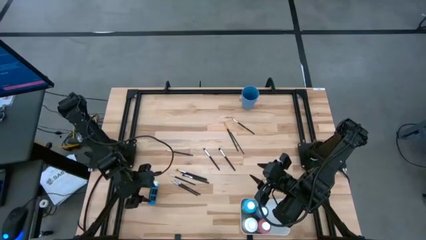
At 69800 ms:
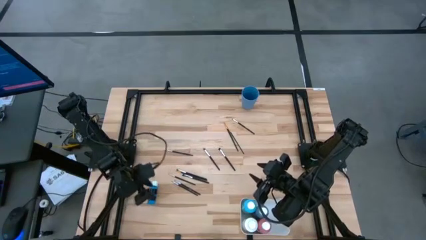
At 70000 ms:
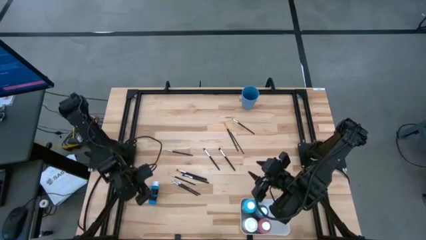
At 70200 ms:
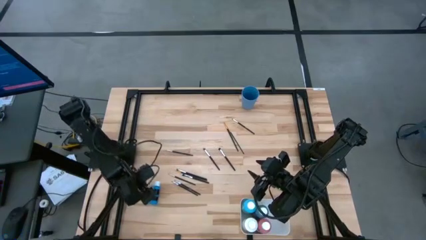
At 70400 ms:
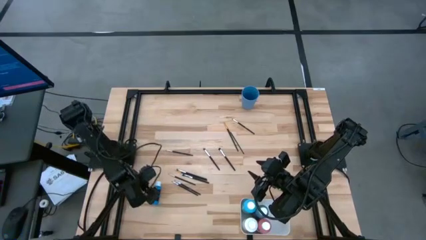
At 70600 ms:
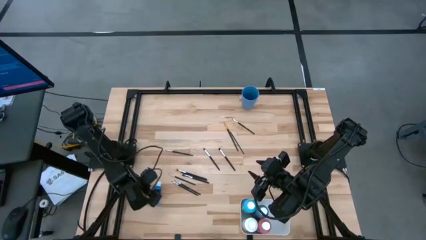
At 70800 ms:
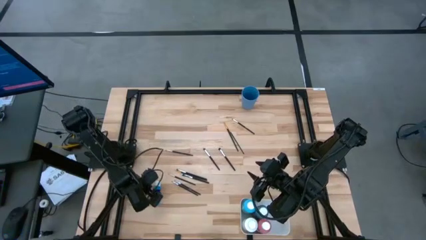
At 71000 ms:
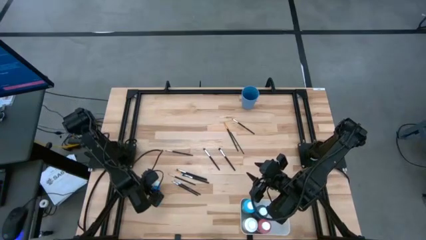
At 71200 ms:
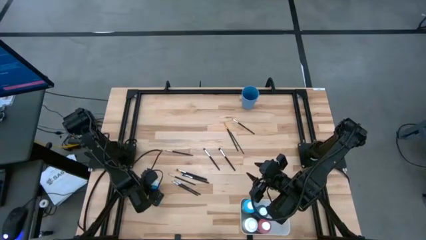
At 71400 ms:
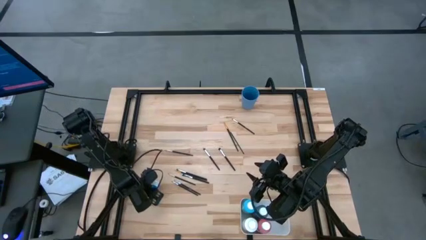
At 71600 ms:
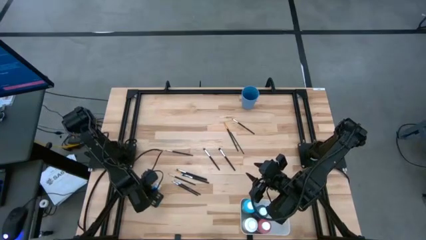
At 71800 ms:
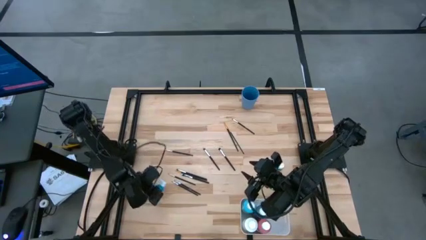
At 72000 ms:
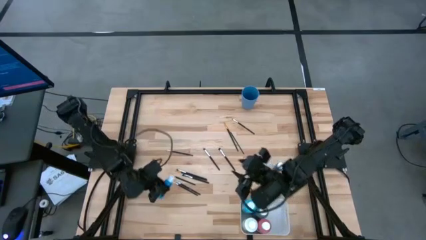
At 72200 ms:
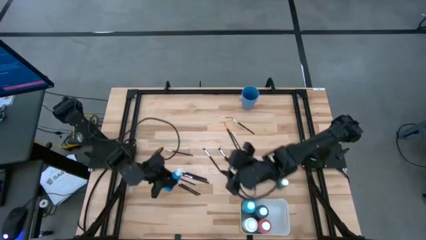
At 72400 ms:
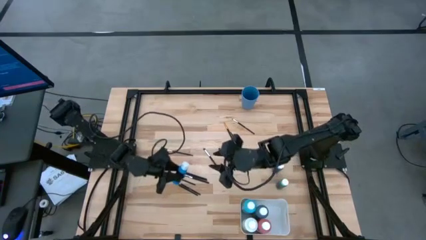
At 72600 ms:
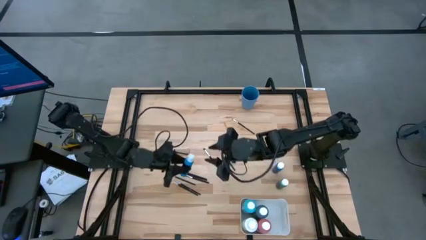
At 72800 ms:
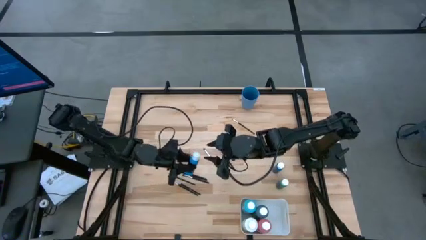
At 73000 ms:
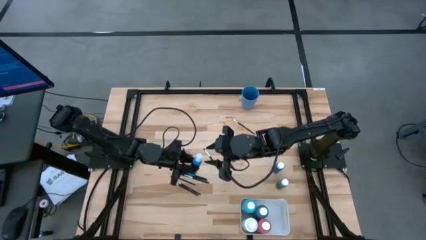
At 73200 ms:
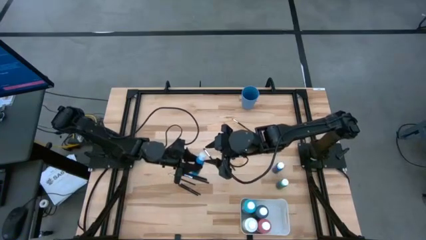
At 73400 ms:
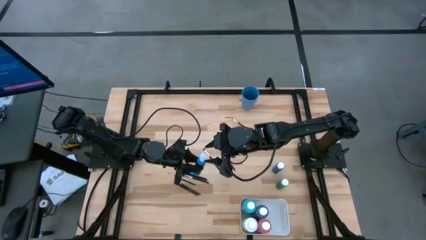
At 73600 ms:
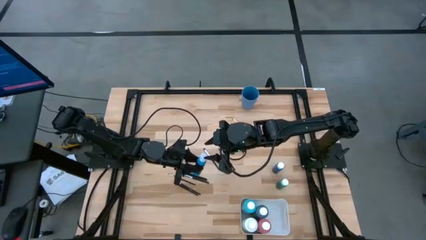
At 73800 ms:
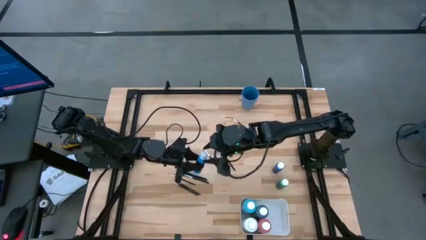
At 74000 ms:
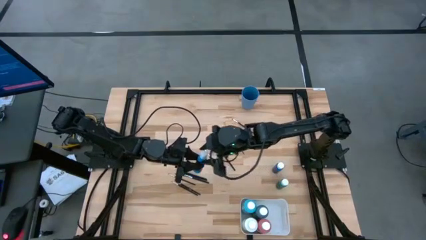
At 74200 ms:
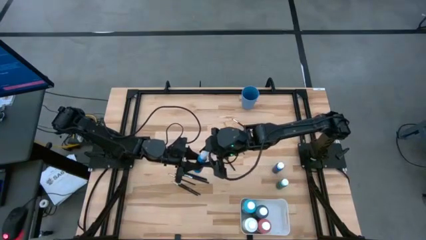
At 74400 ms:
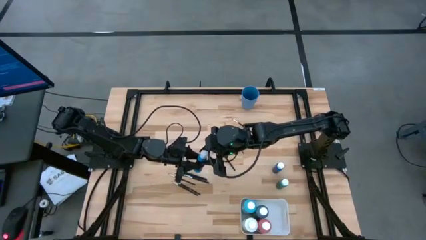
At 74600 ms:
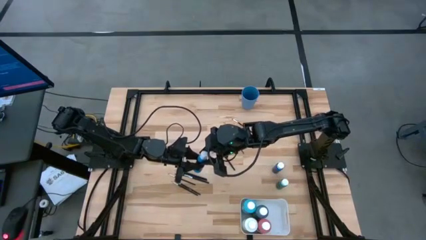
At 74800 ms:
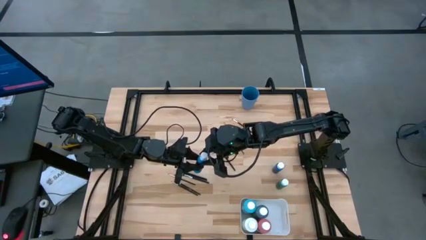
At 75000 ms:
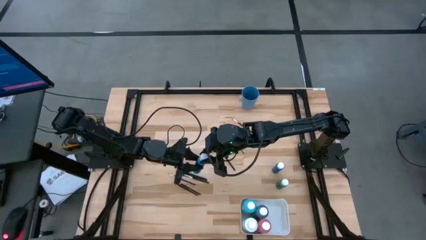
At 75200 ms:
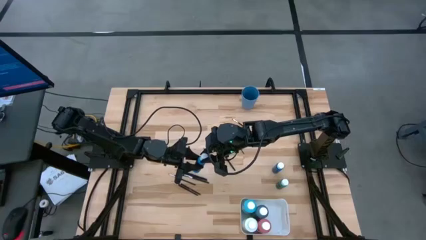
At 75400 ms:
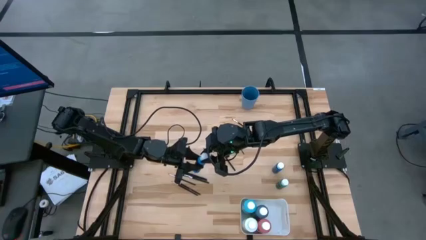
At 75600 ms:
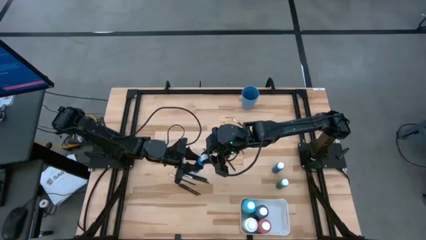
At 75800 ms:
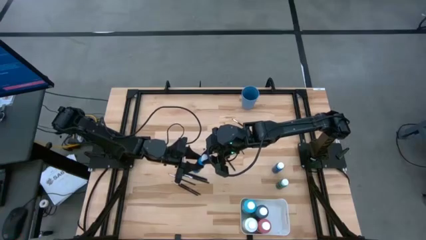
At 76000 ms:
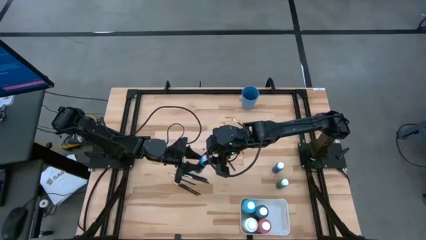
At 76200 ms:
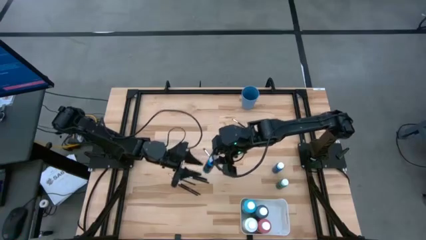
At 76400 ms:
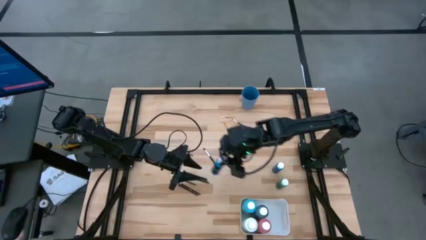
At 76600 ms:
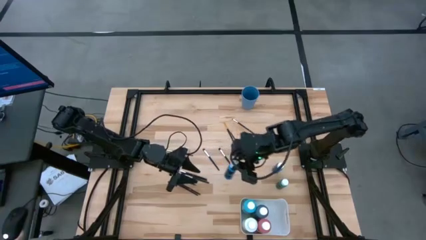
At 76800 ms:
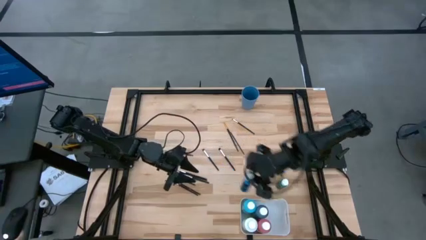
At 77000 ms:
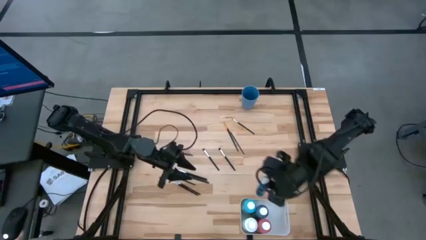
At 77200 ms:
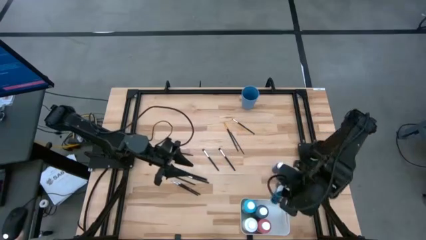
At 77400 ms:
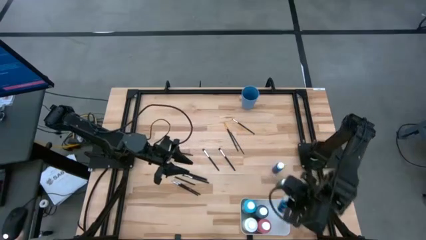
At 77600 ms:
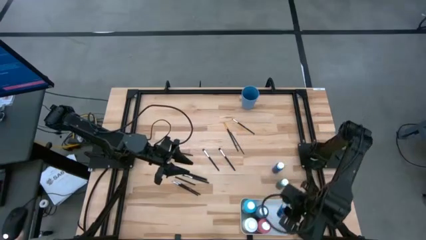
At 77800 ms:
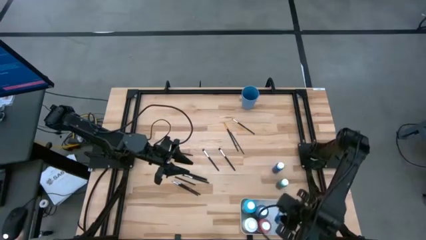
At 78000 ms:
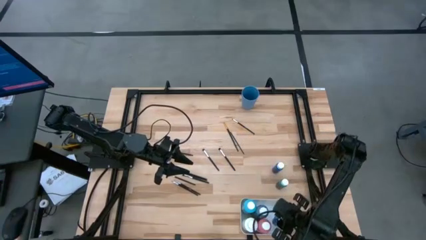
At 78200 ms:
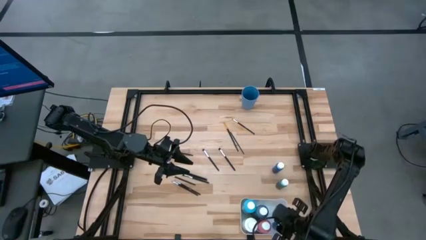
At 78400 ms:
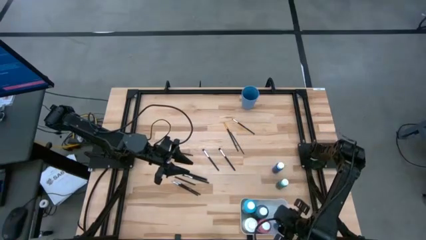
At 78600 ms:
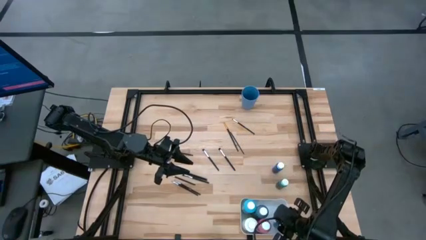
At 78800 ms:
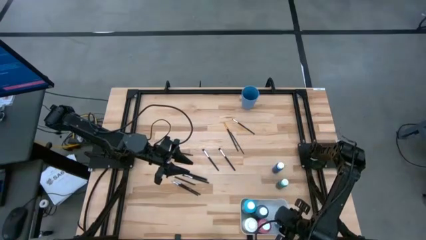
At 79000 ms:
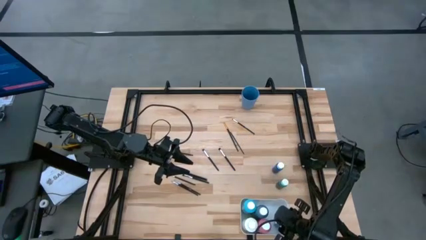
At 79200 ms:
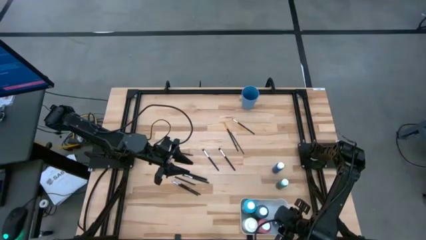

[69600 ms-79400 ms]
Task: Pick & Place Paint Supplies
Put the left small blue paint bottle into the white bin

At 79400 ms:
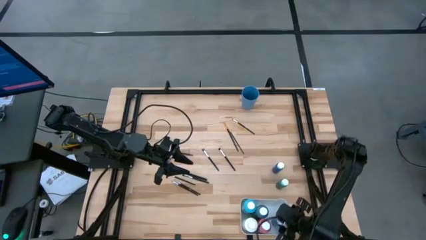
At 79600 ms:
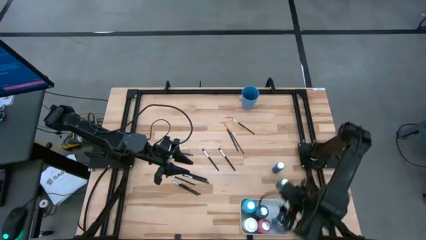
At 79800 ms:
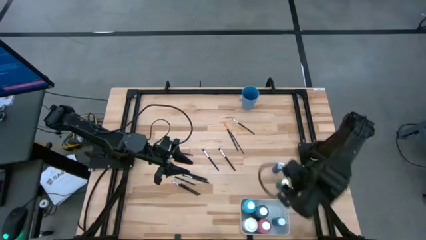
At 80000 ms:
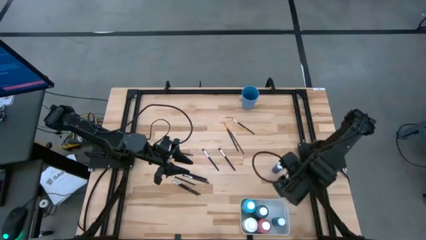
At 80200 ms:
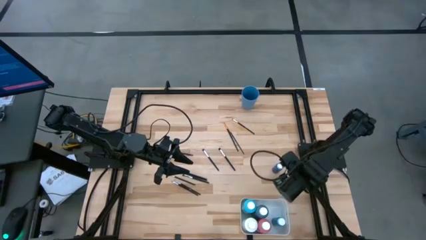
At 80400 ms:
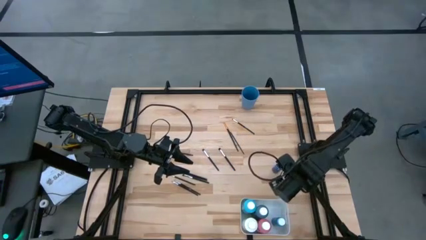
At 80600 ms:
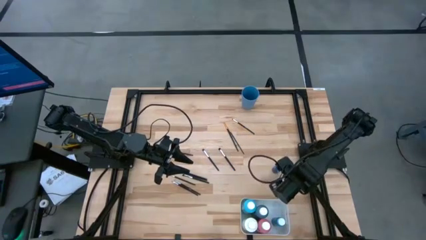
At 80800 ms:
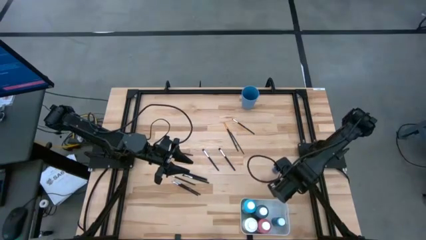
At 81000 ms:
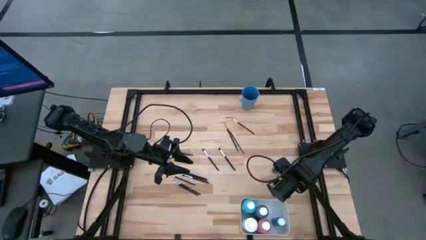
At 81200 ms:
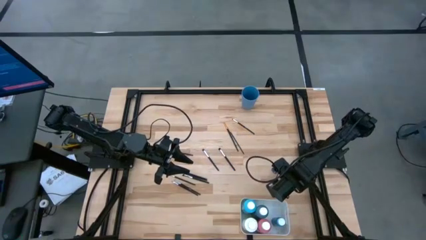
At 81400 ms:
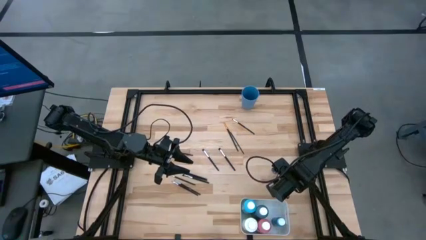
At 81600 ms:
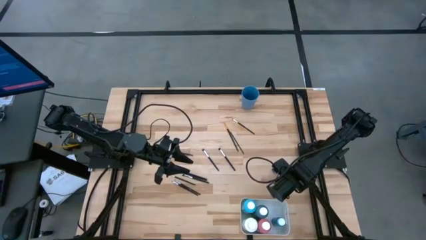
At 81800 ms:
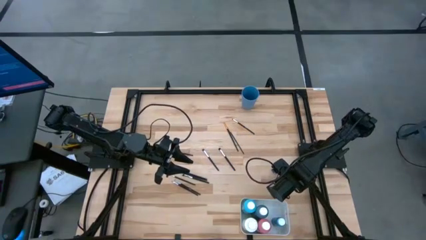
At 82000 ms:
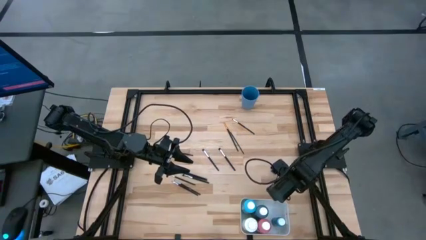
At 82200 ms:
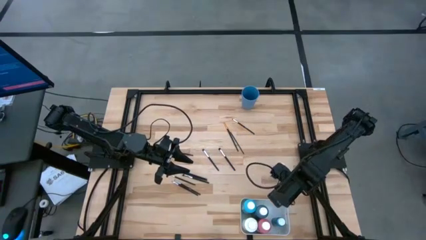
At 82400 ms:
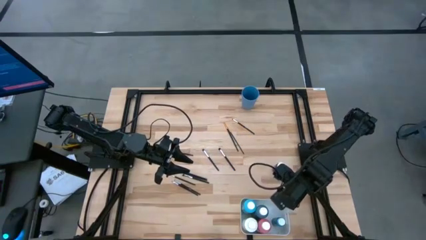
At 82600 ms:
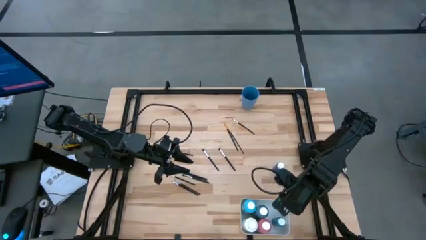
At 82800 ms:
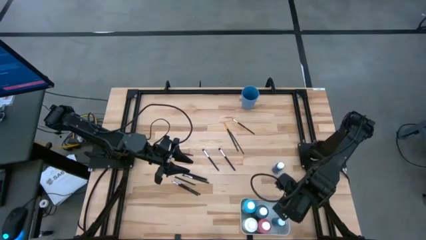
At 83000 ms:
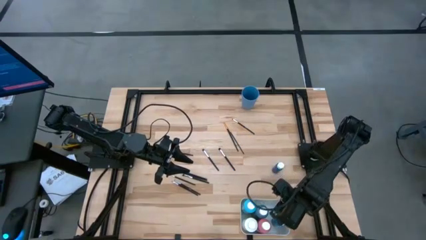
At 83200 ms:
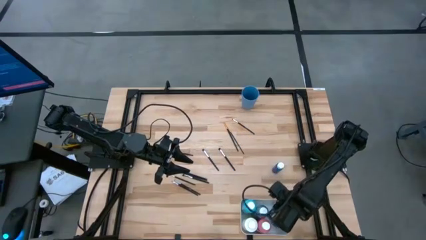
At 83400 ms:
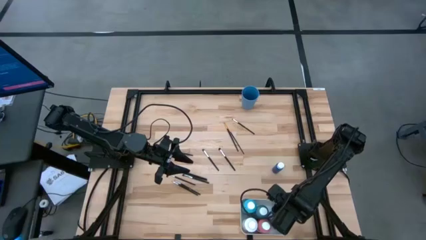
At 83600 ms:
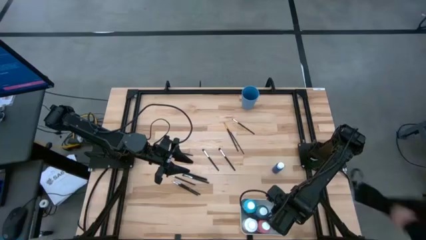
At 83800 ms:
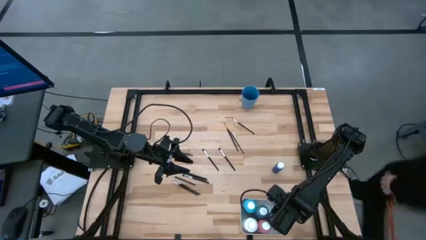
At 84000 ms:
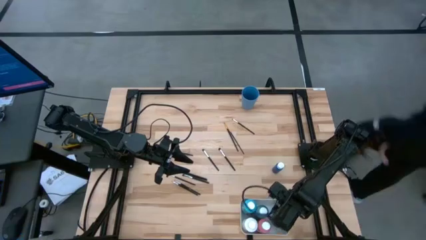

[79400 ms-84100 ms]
Put the small green paint bottle into the white bin
